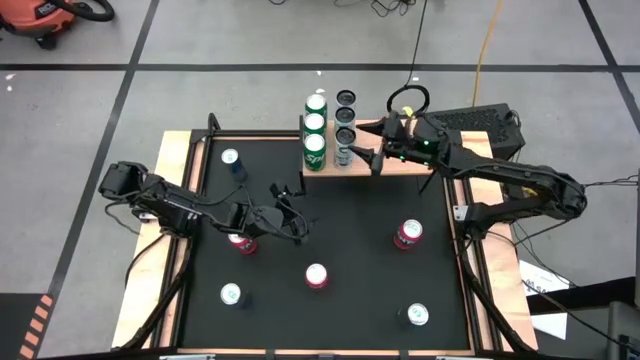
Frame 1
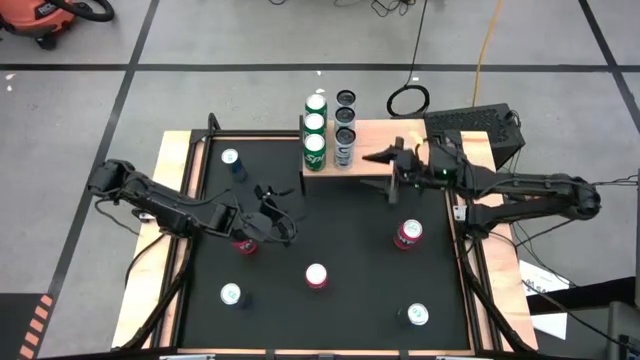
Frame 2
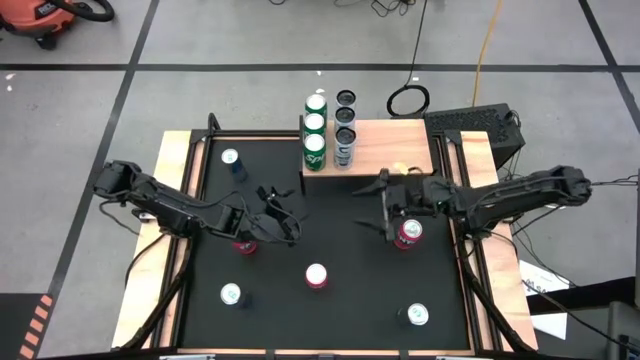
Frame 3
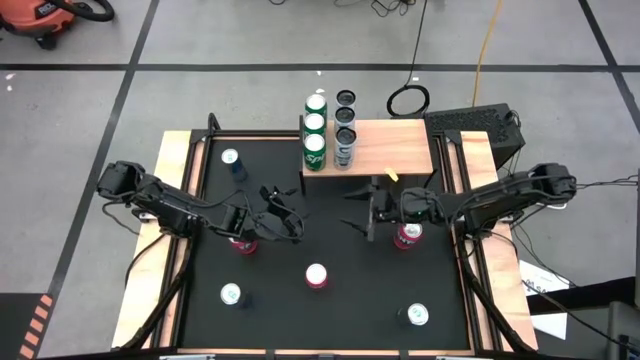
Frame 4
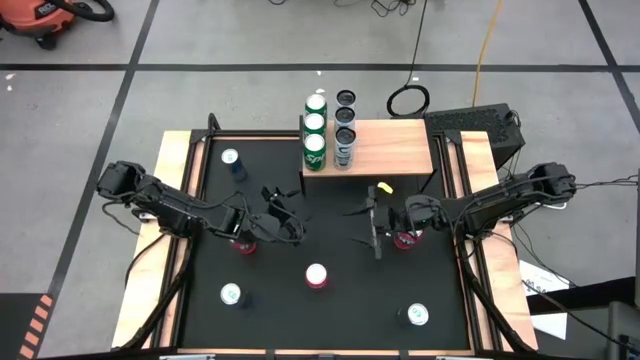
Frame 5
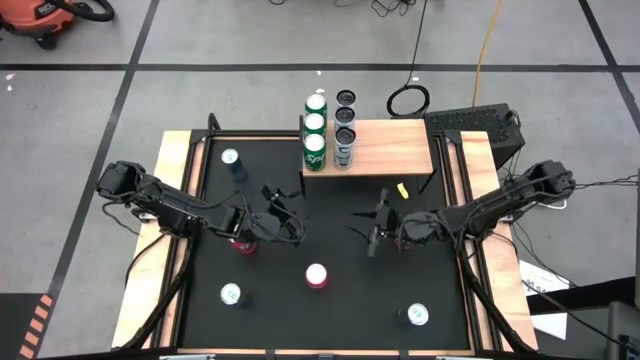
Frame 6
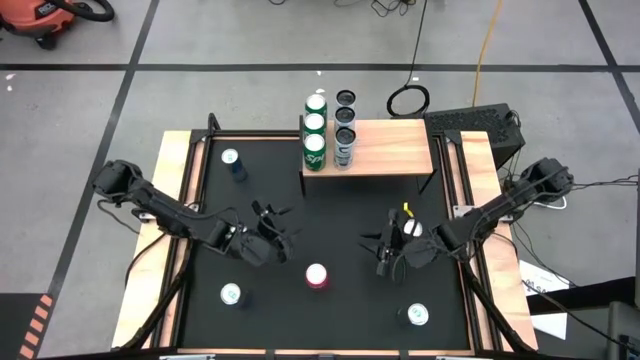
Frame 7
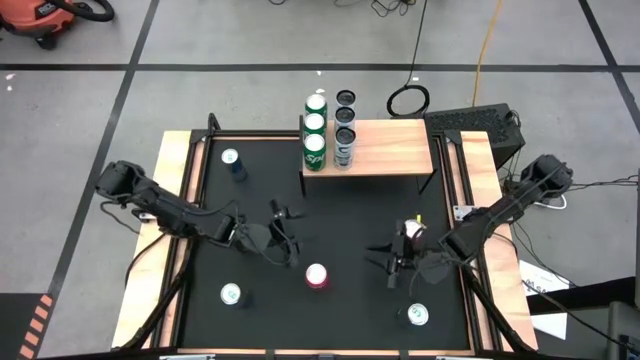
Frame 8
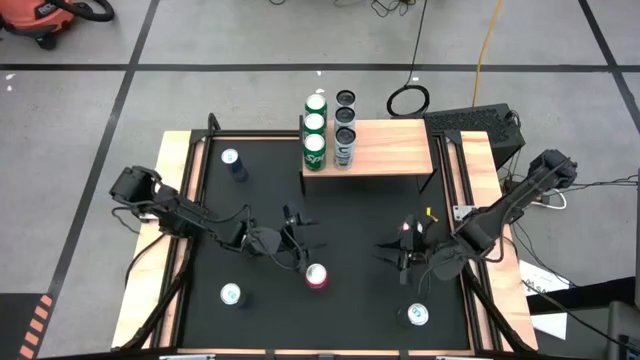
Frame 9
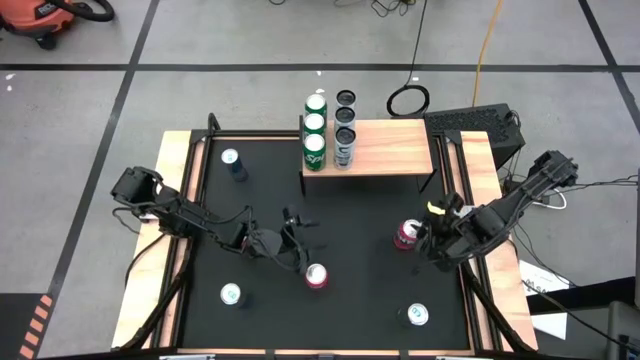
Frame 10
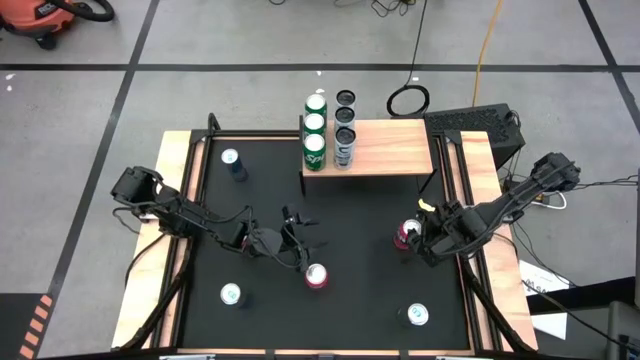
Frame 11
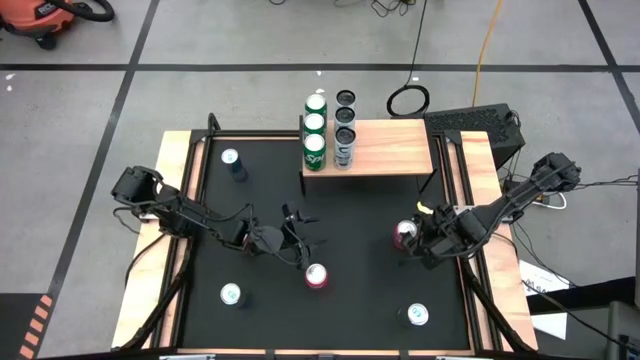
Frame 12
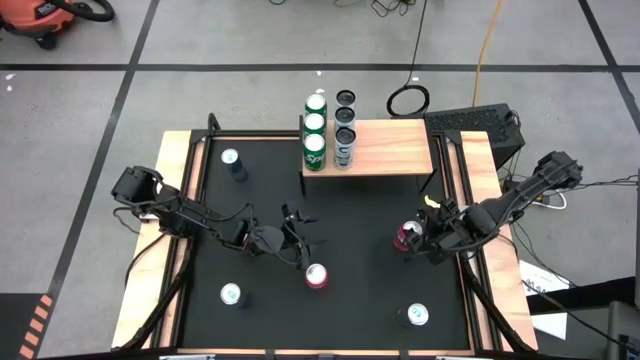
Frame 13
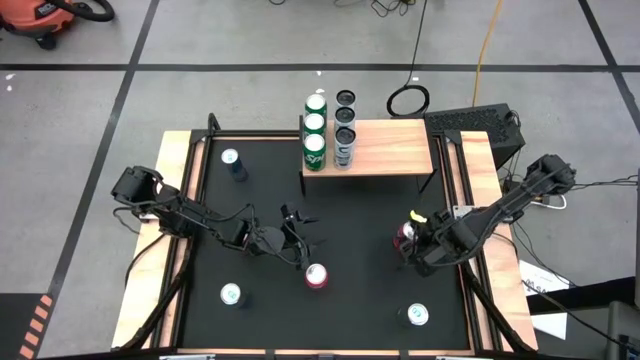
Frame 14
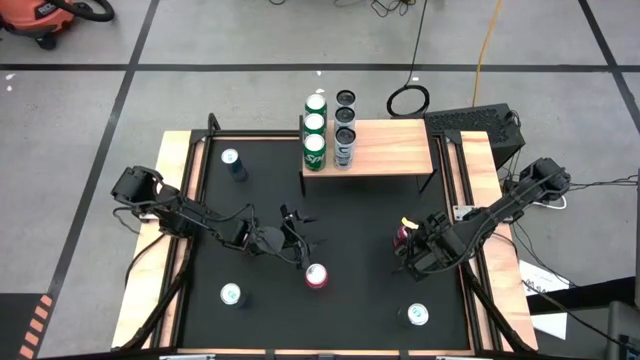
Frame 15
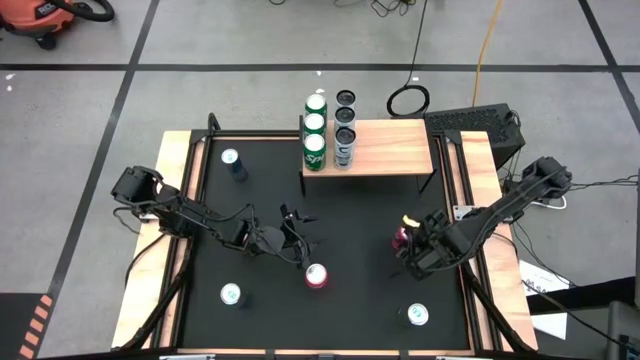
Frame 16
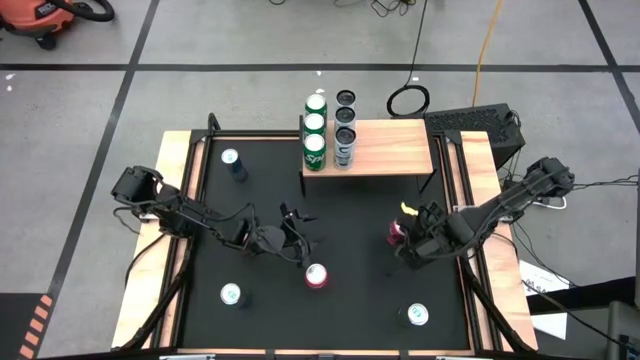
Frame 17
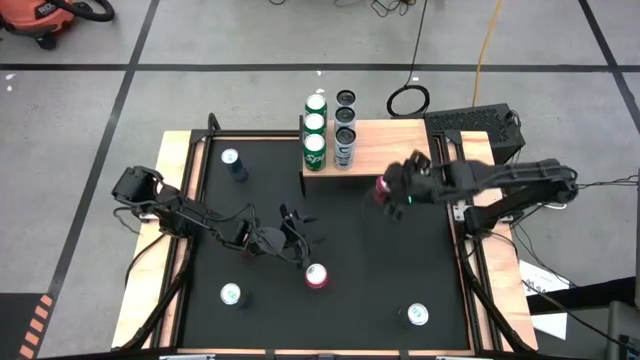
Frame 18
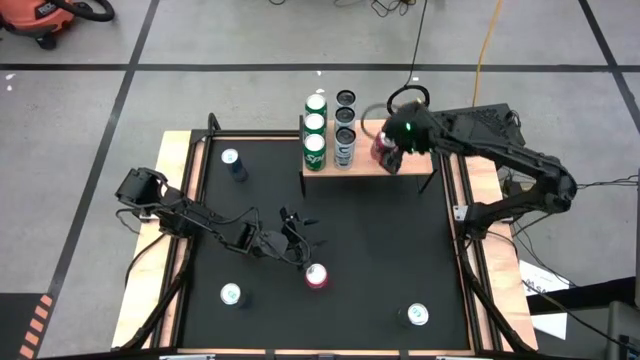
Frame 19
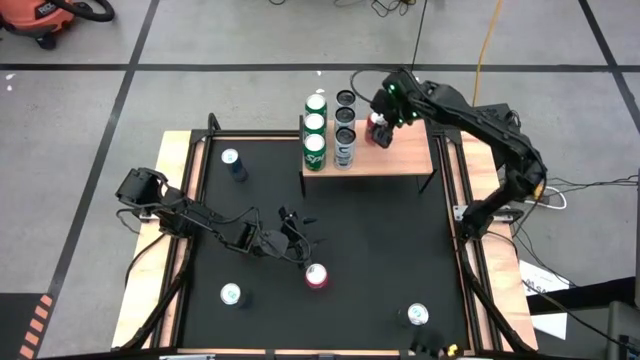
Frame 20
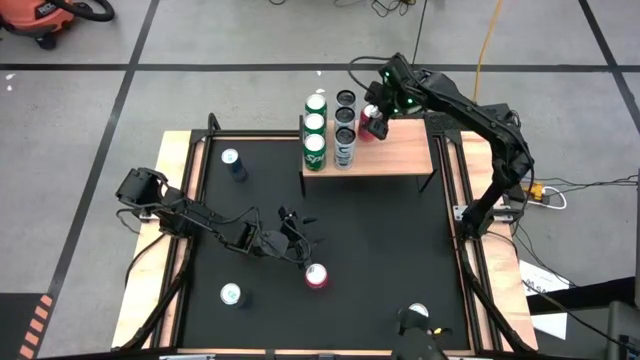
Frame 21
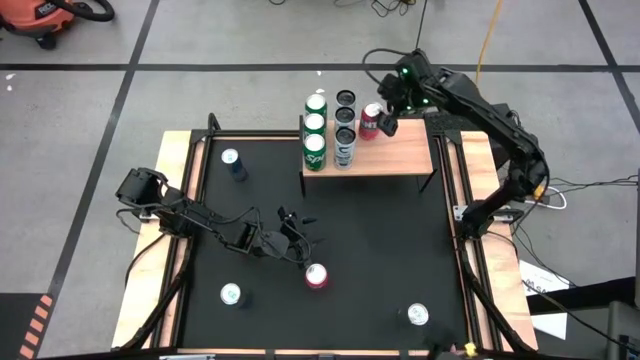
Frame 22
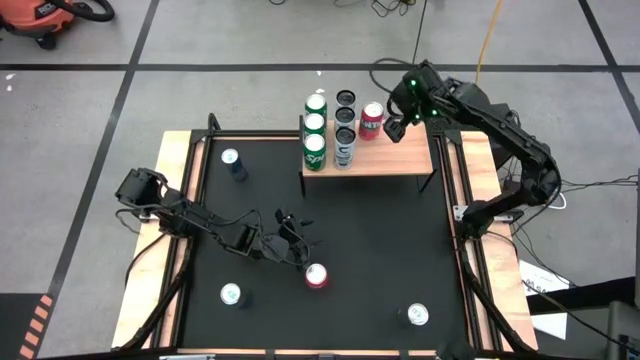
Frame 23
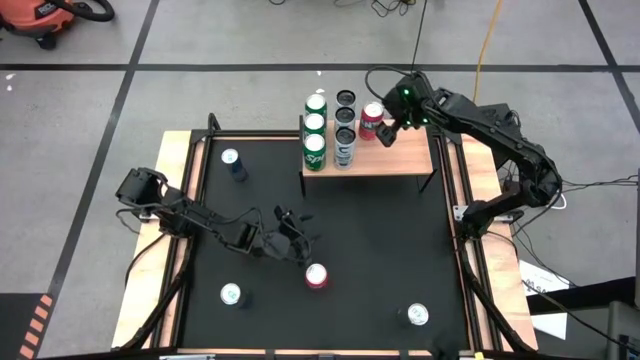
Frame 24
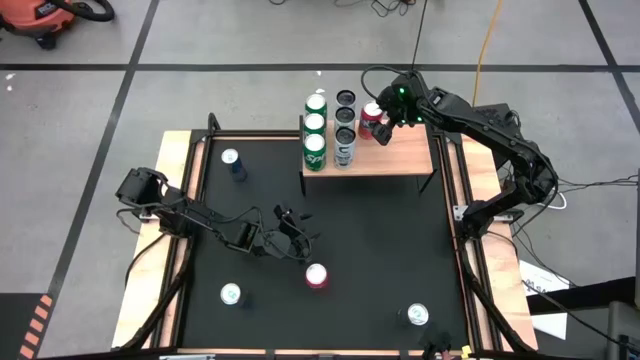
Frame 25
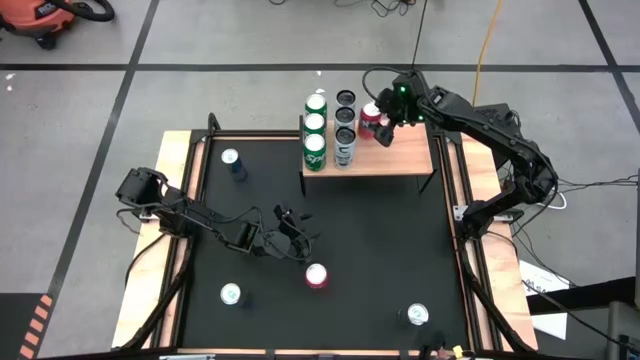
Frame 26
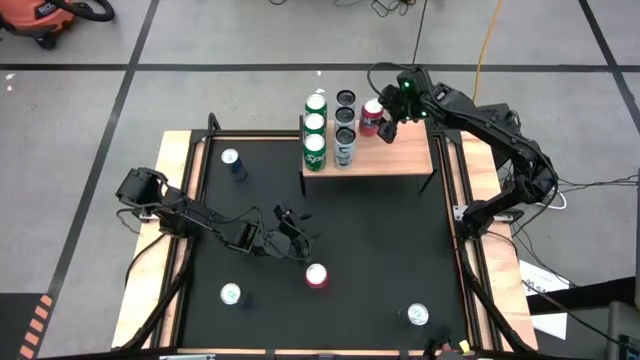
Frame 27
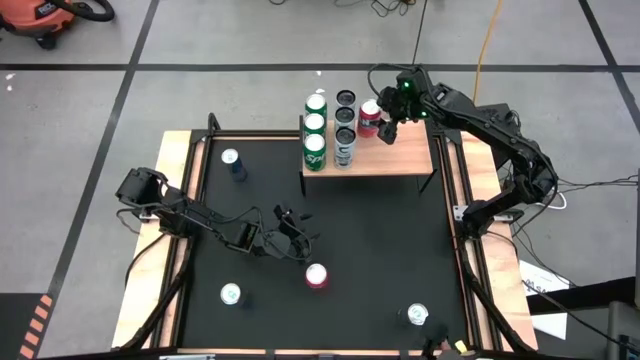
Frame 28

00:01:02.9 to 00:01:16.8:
Task: Place canned beverage on shelf
Put the right orange soda can on the shelf

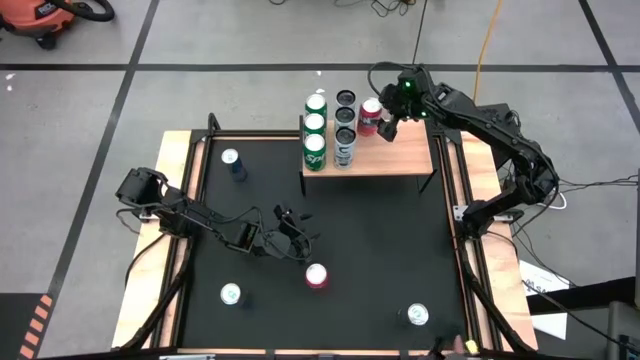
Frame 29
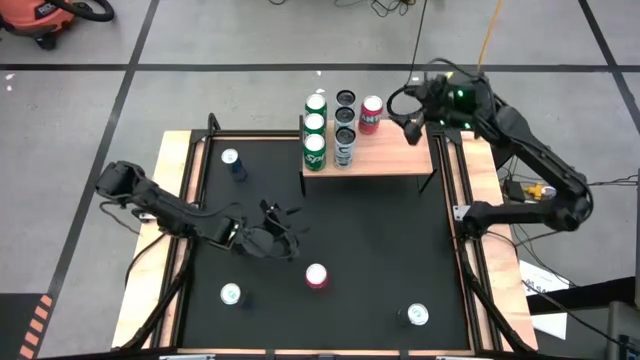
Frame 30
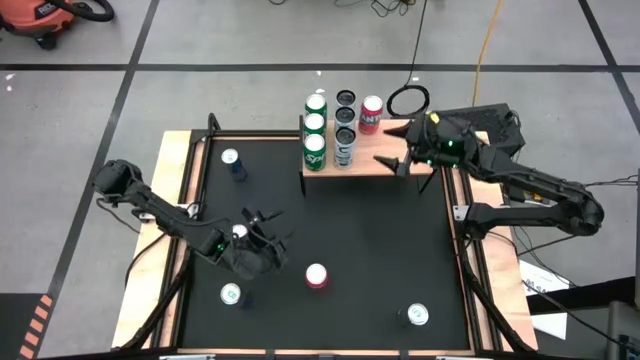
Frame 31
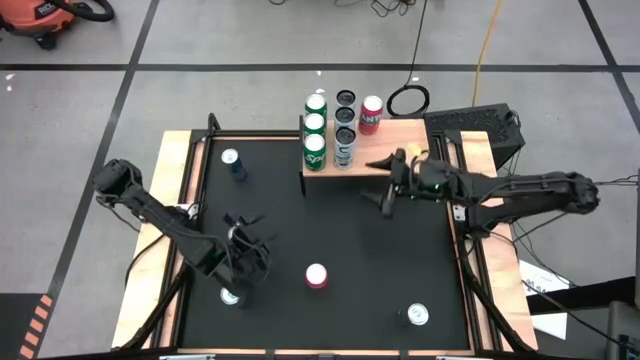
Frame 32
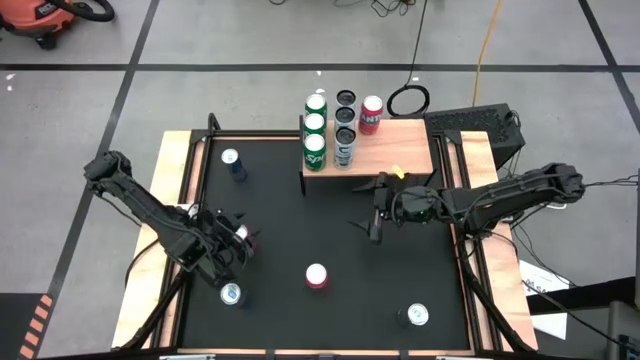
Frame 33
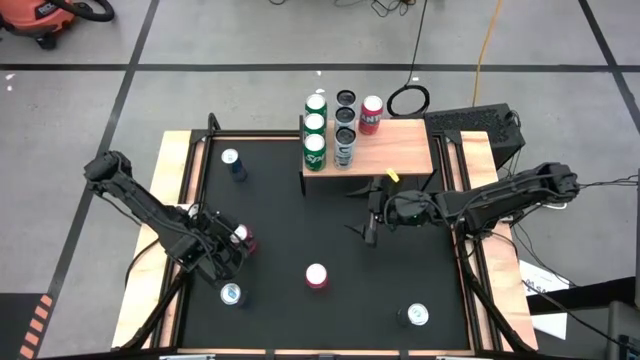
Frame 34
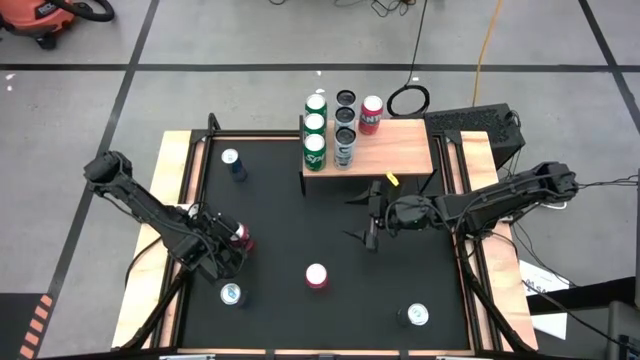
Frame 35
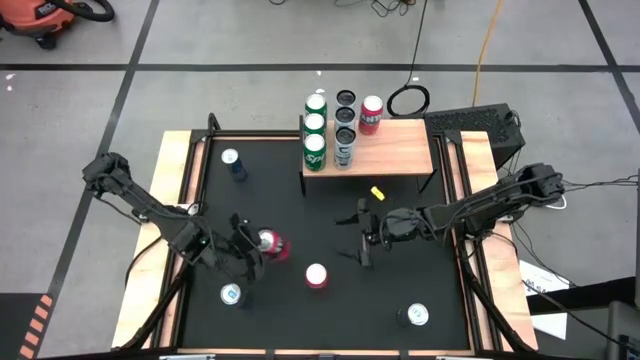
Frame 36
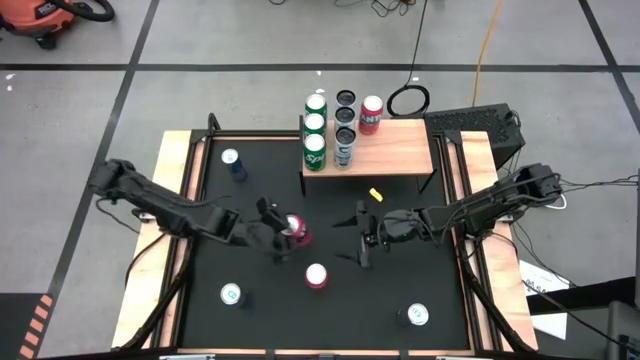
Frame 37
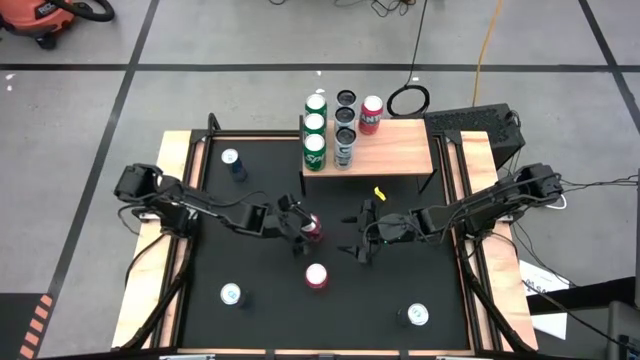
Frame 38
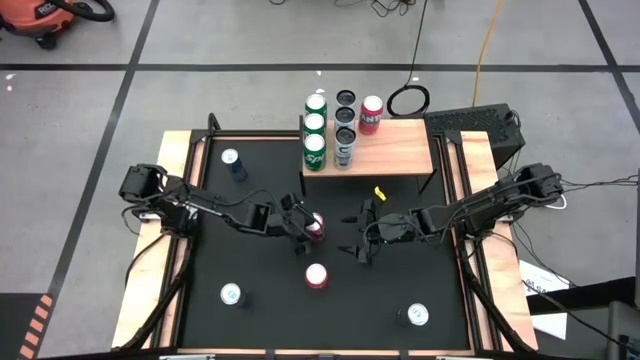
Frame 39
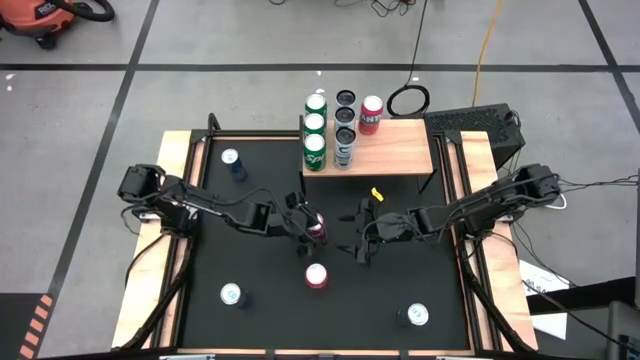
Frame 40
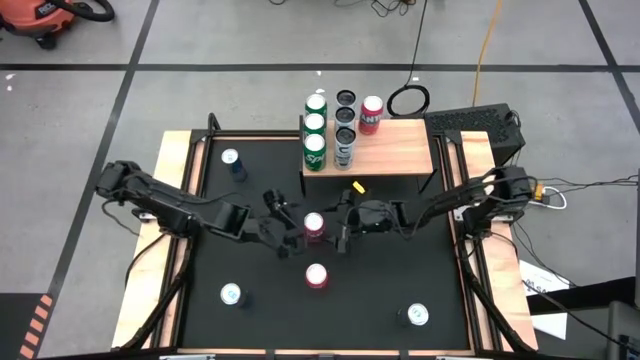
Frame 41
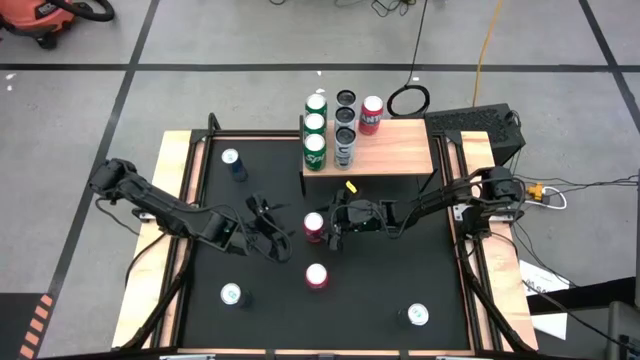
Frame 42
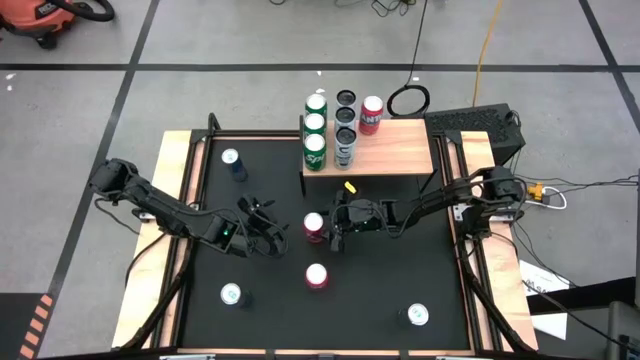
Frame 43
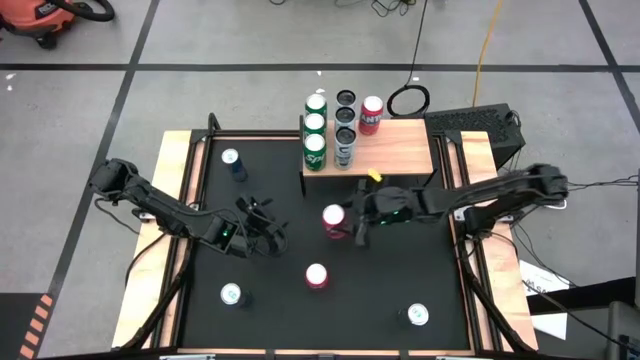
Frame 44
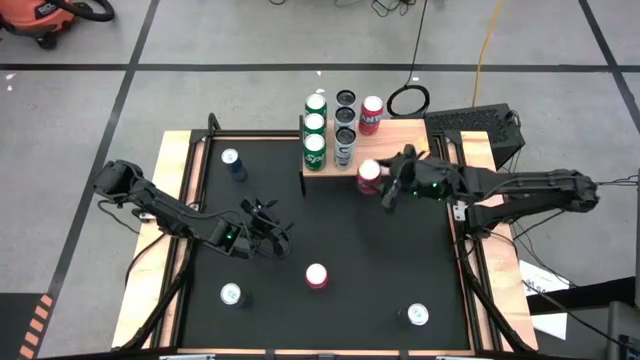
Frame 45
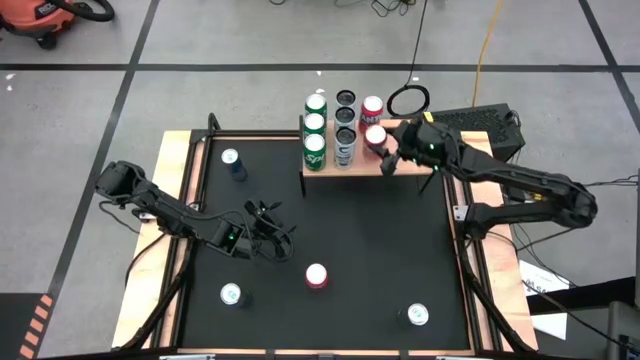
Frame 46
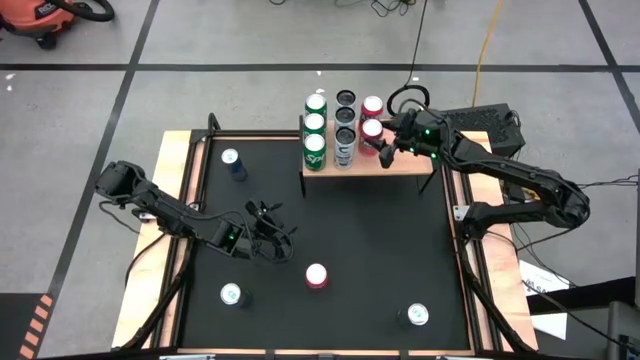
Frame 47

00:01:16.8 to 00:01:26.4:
Put the left orange soda can on the shelf
